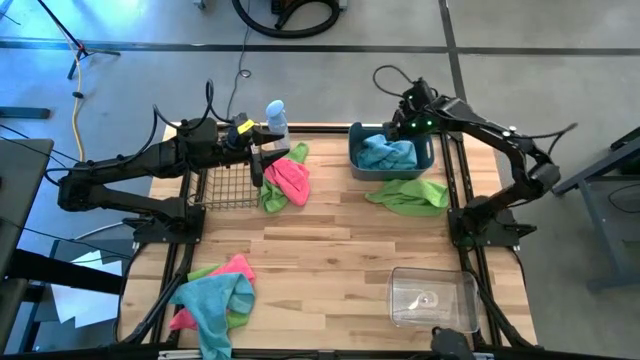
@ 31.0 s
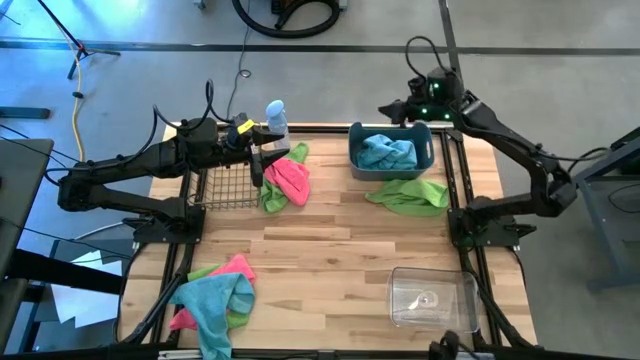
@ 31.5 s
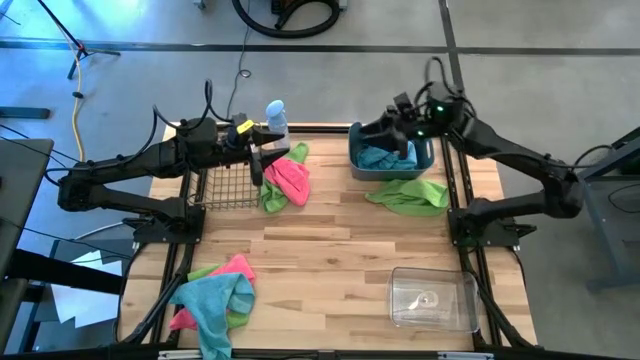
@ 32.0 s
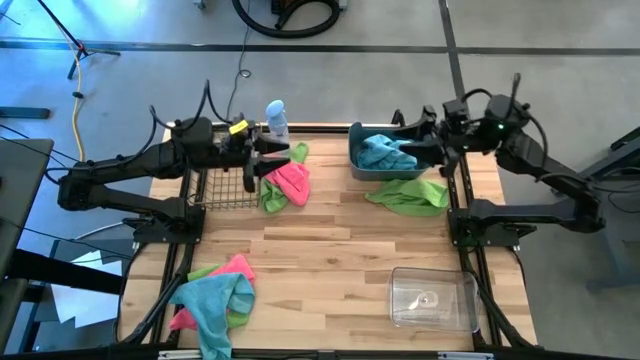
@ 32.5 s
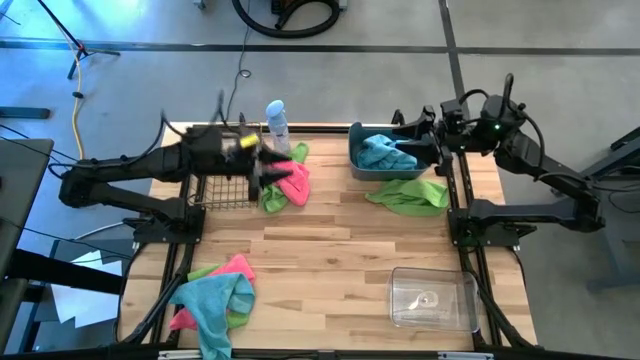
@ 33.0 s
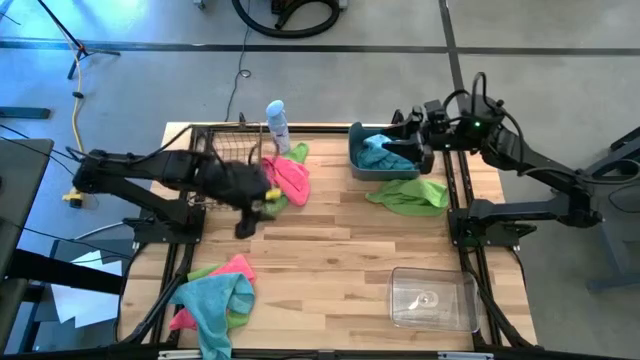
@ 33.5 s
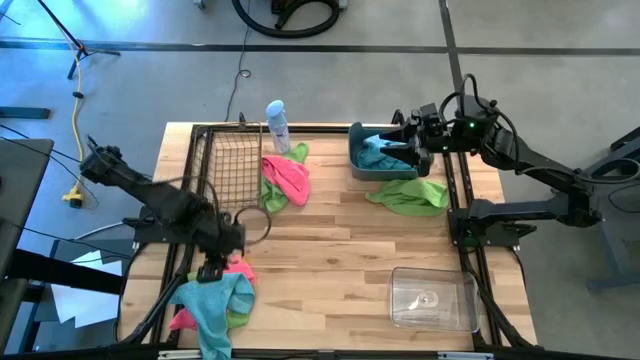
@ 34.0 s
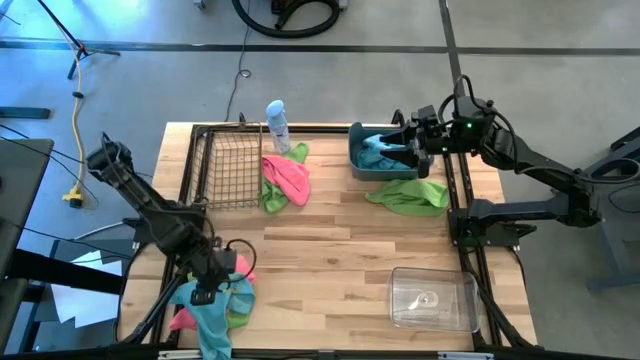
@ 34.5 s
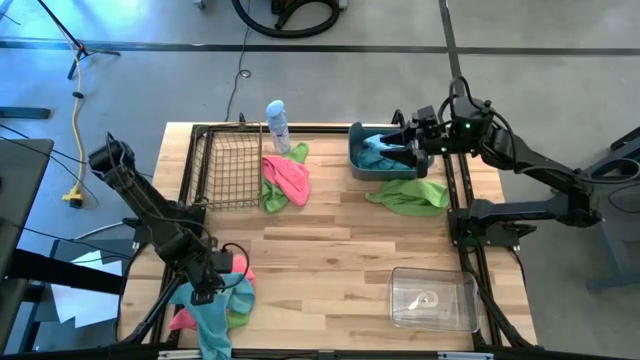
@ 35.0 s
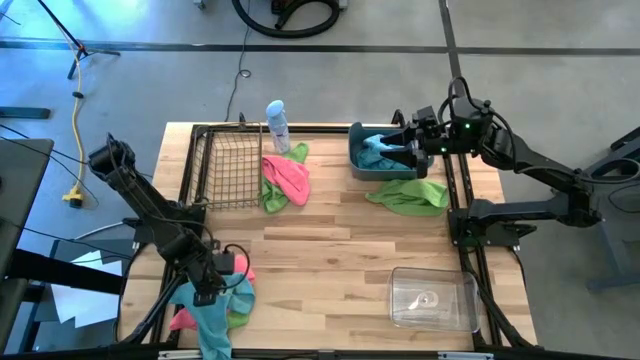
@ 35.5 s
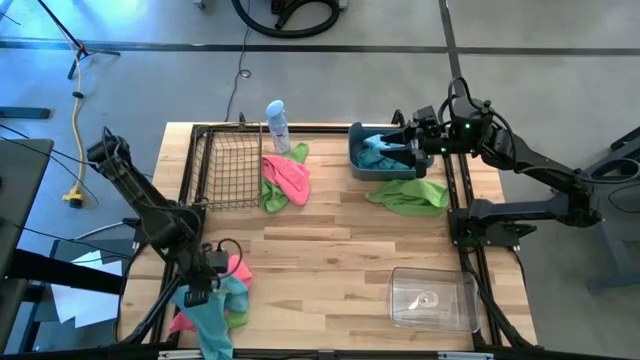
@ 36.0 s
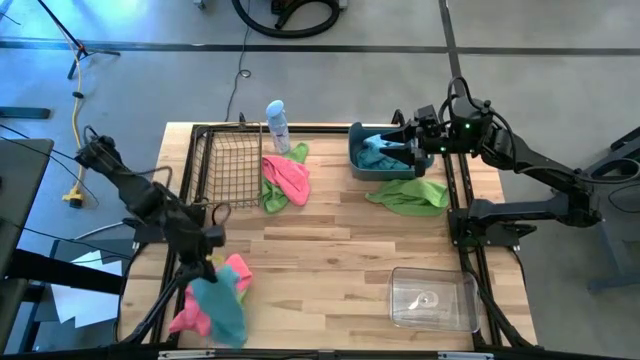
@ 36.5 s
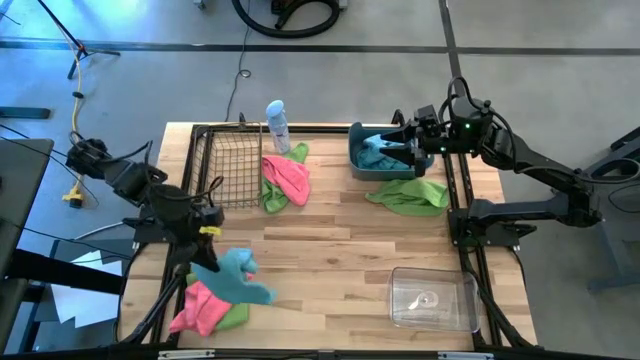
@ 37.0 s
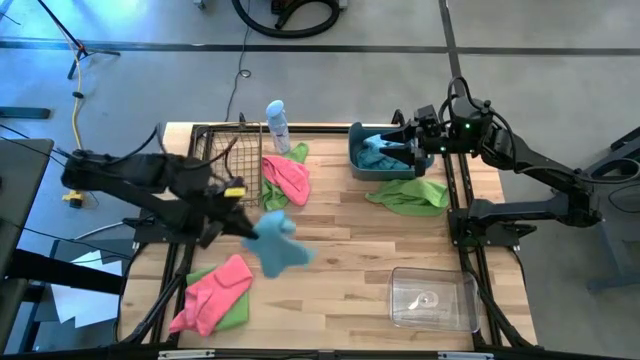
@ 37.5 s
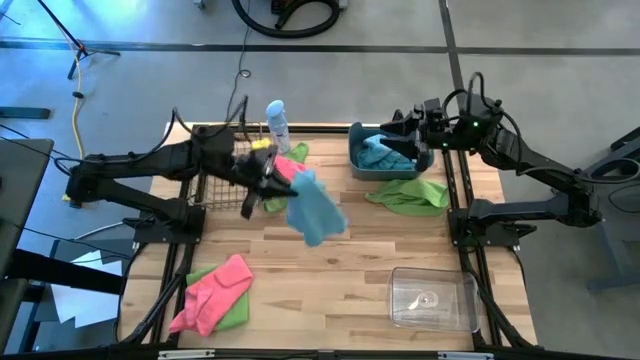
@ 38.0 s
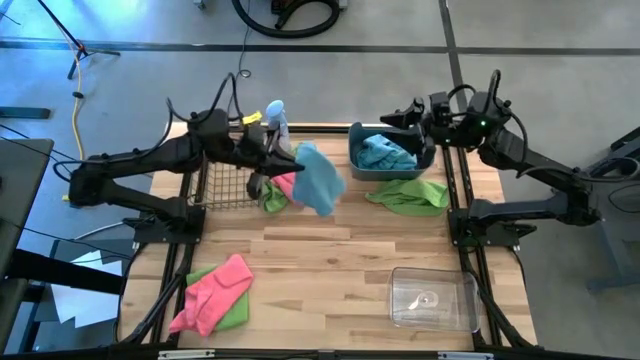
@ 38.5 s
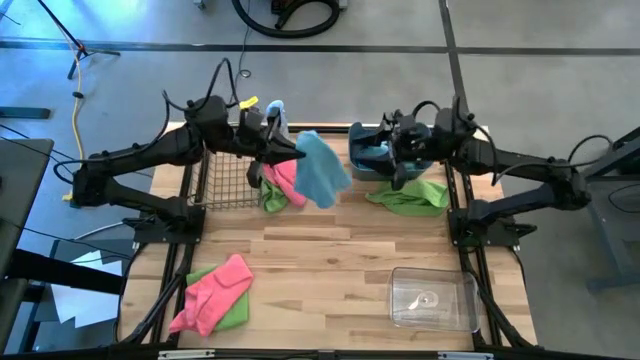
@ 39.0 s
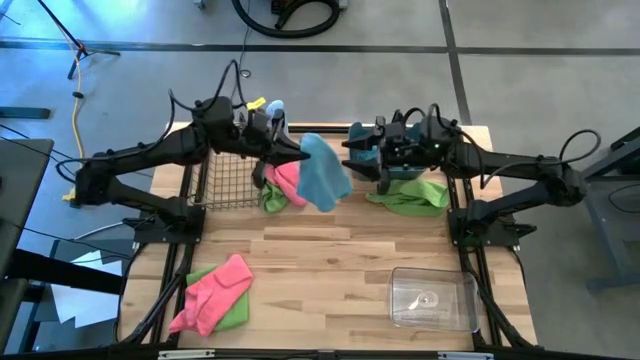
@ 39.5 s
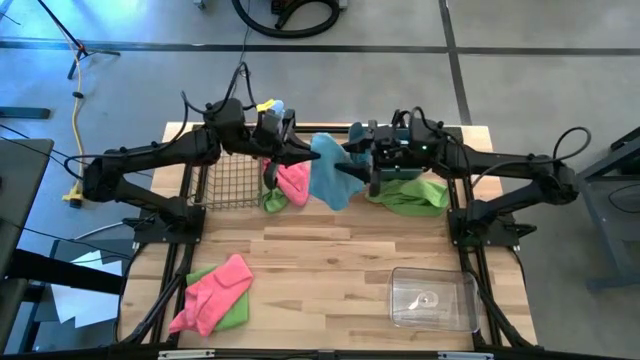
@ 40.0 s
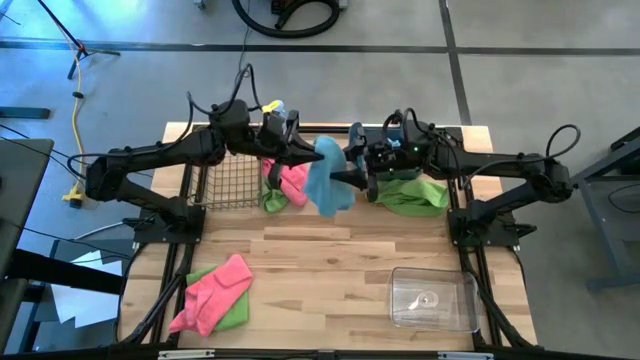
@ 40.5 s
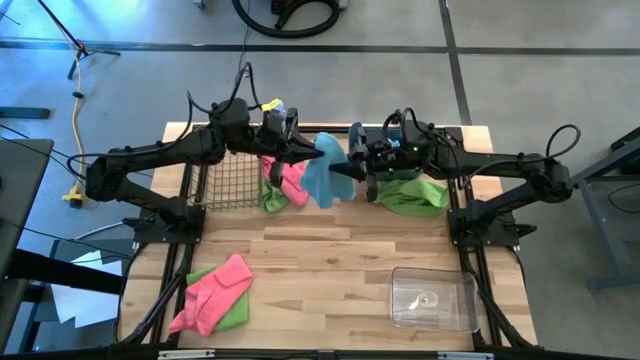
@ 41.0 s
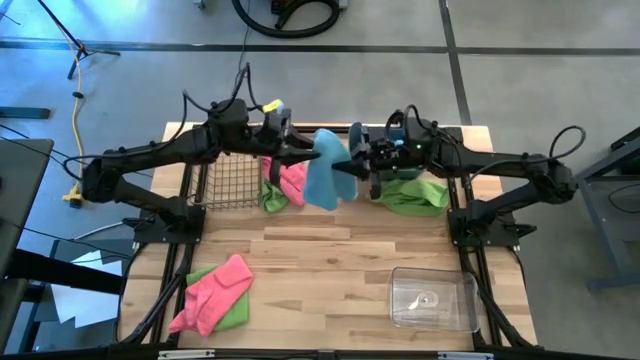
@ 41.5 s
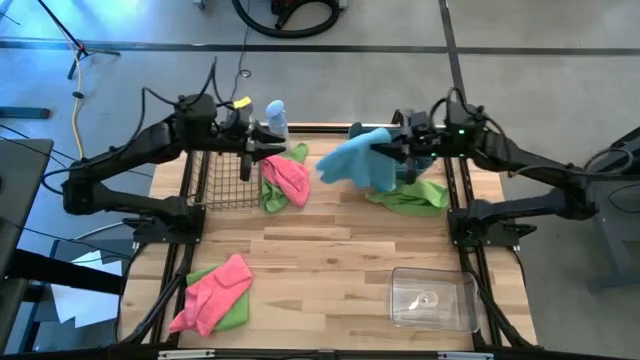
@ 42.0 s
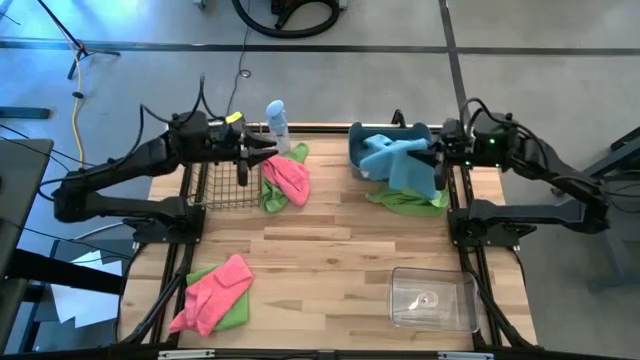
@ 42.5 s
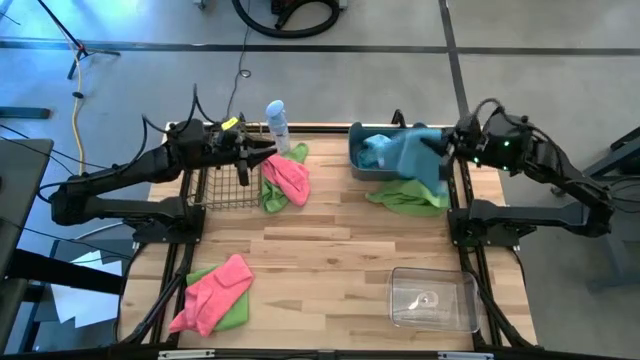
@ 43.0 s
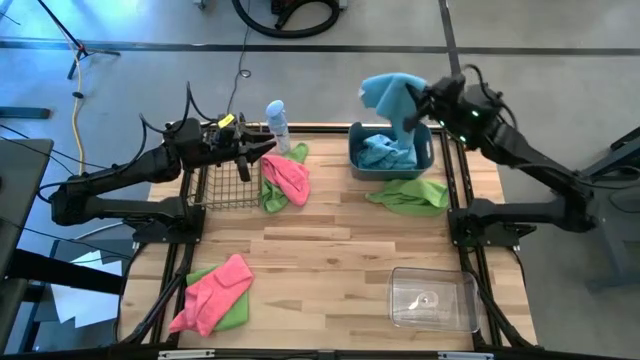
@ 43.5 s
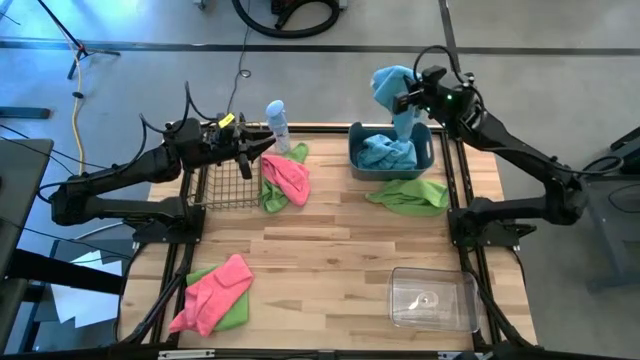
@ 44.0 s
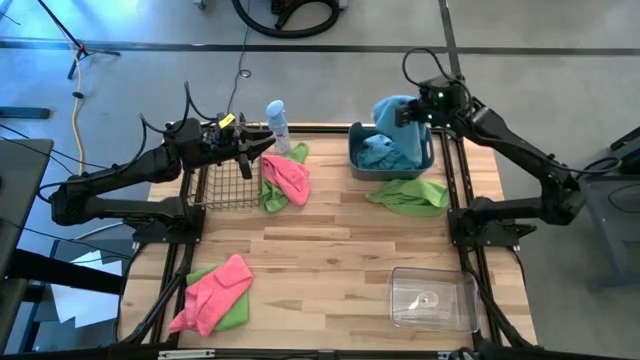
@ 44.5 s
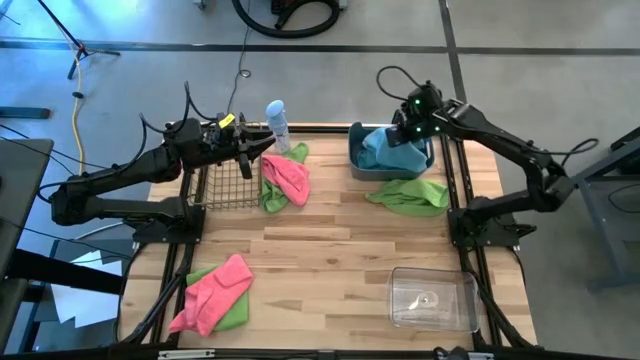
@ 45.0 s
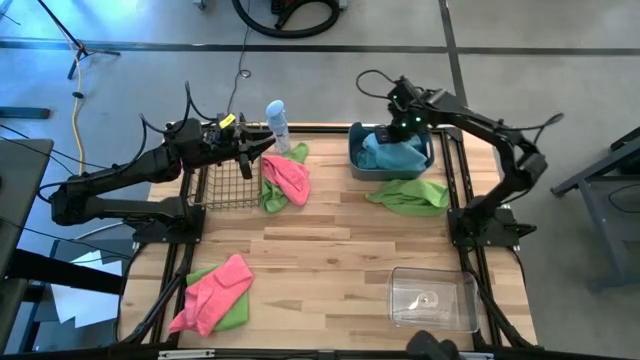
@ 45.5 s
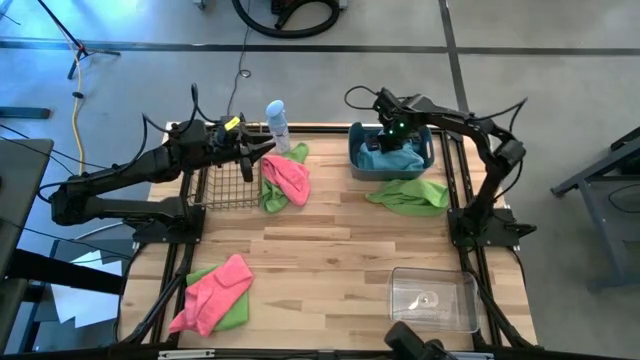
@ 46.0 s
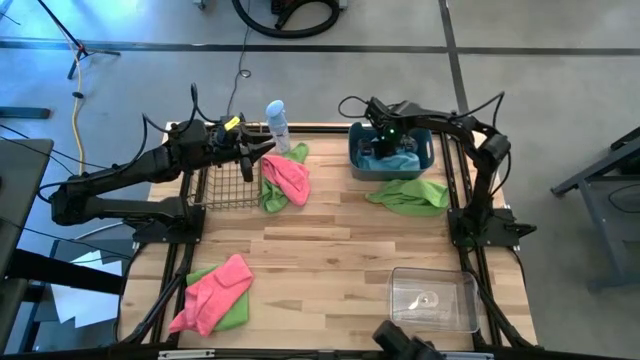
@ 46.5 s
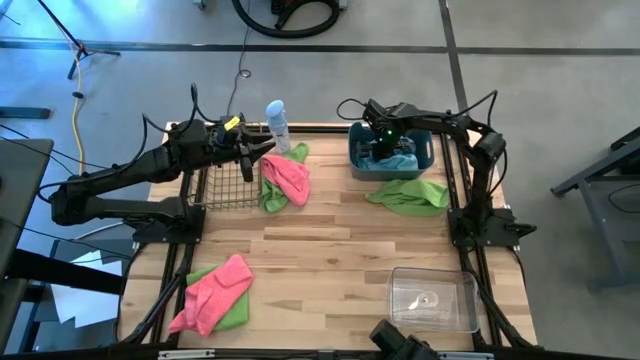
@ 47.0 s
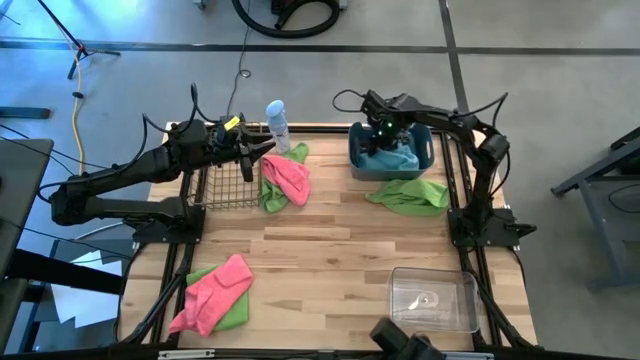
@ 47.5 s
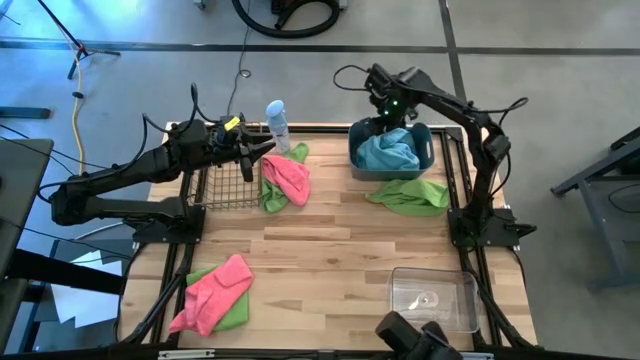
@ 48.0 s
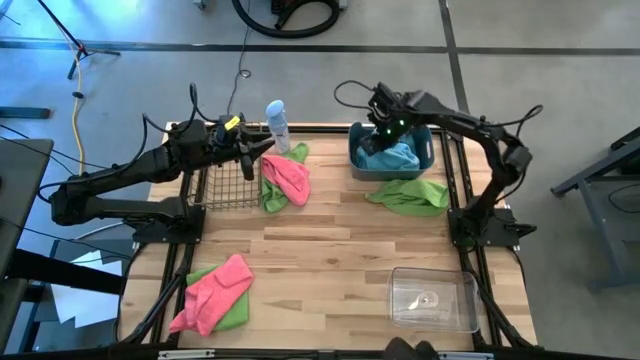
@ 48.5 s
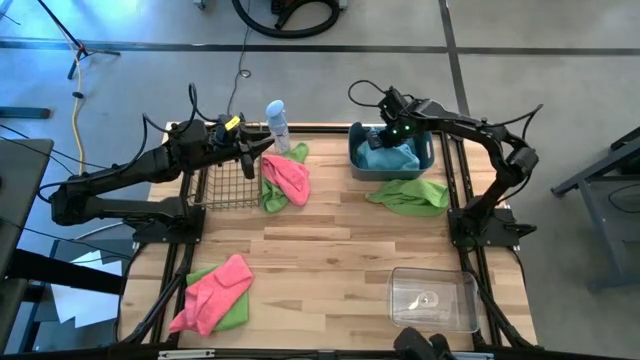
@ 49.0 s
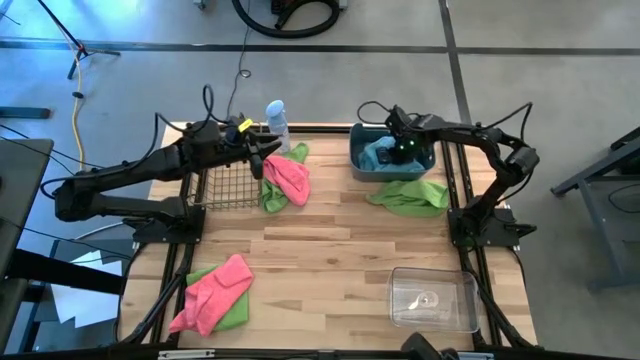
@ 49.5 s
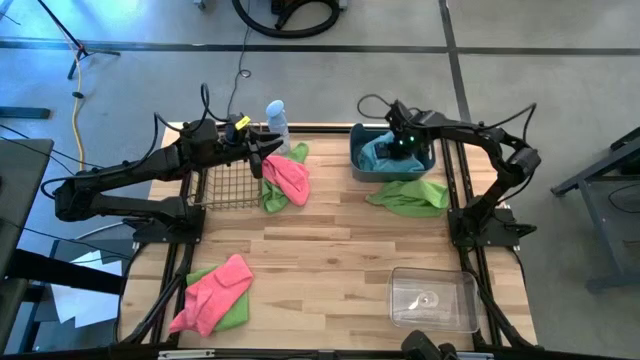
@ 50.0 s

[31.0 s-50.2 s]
Task: Sort microfiber towel by color & place in baskets
Put the blue towel into the blue bin

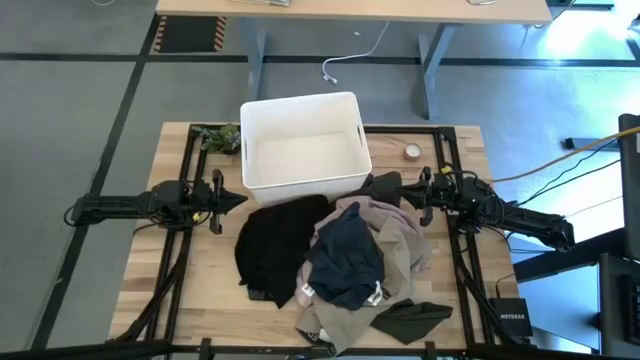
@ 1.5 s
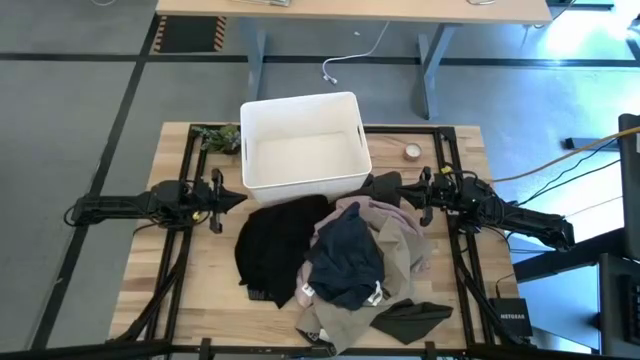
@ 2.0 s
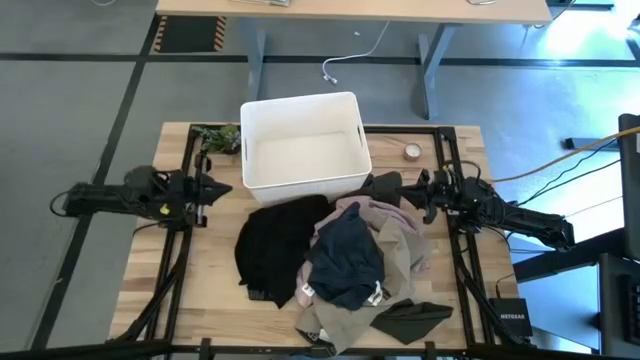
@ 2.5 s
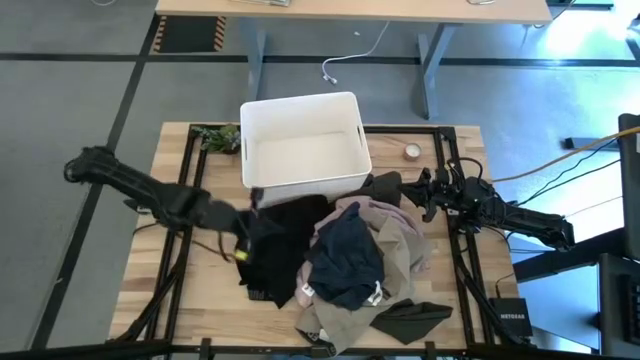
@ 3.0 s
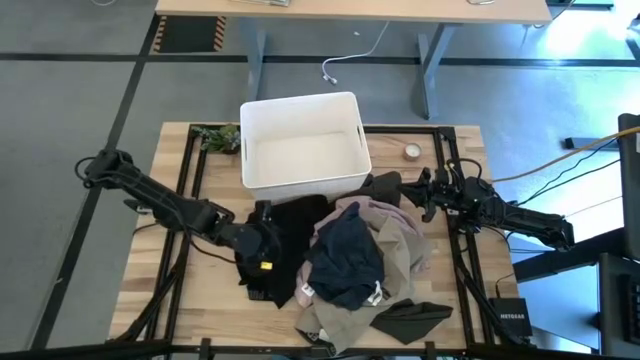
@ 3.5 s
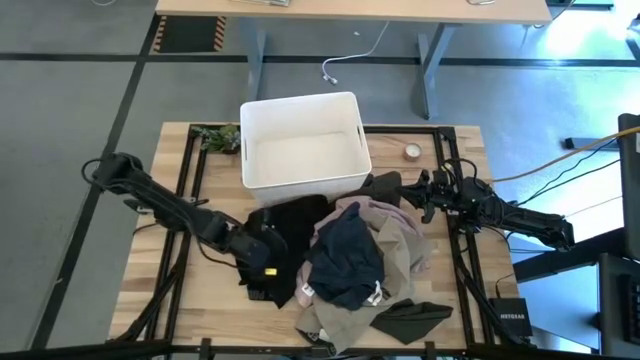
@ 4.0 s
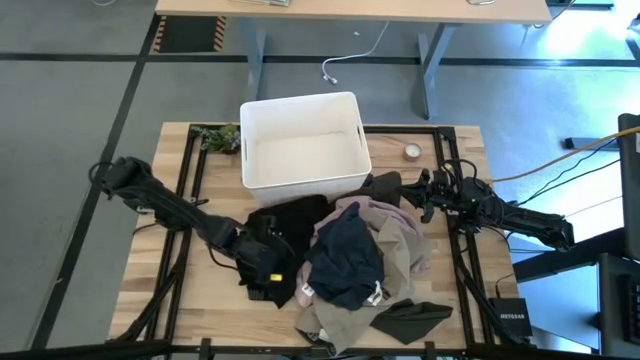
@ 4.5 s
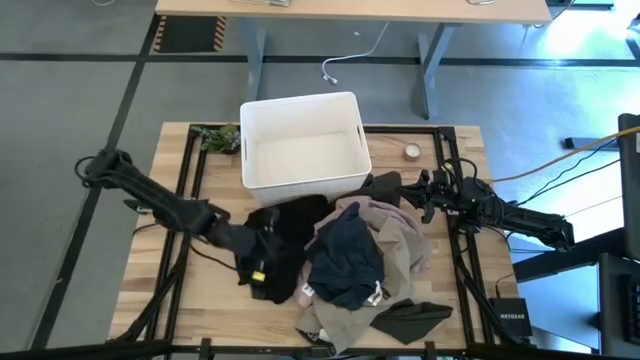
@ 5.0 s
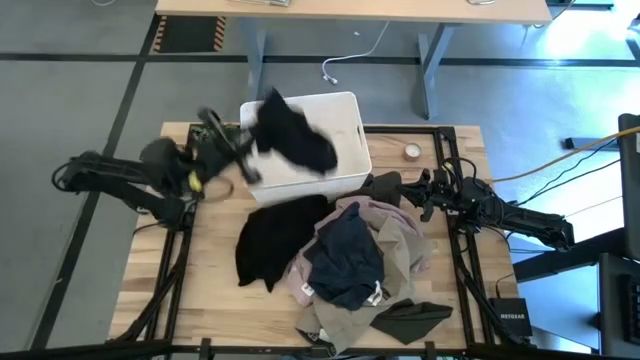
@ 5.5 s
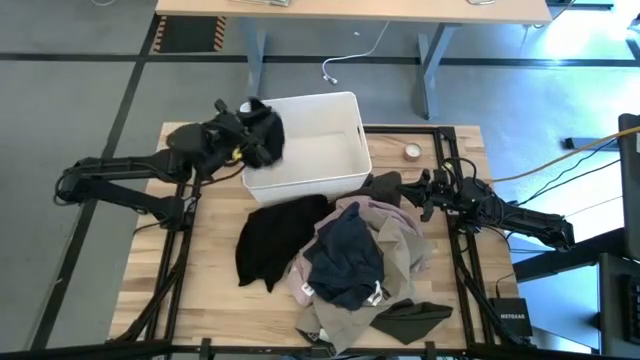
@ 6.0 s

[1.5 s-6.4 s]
Task: Sort clothes
Put the black shorts into the white laundry bin
